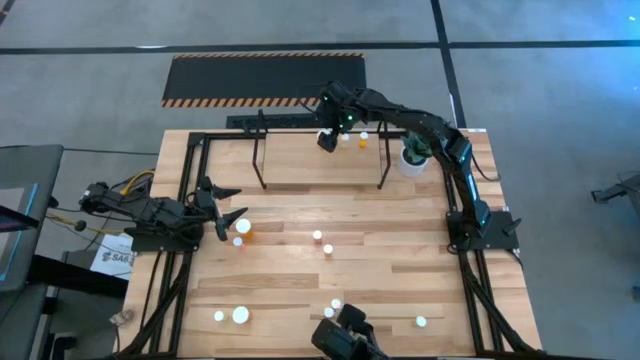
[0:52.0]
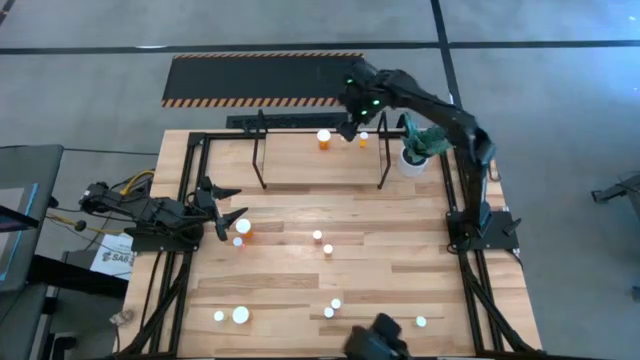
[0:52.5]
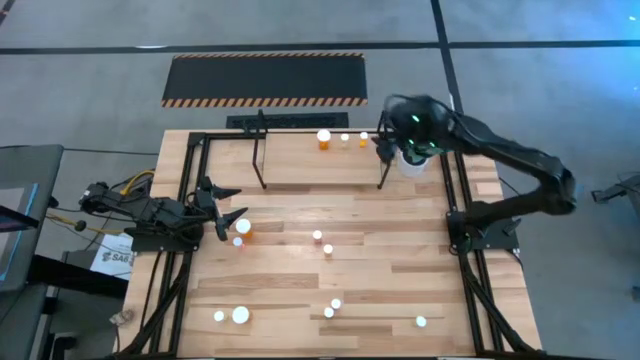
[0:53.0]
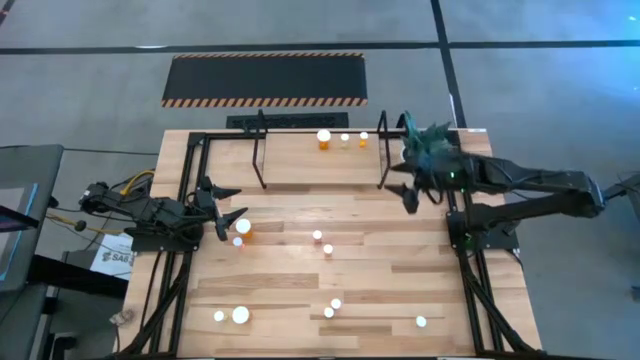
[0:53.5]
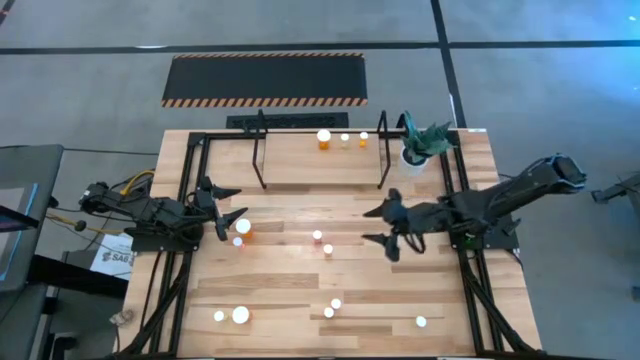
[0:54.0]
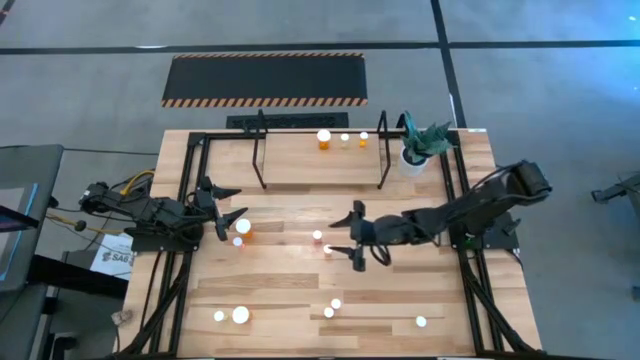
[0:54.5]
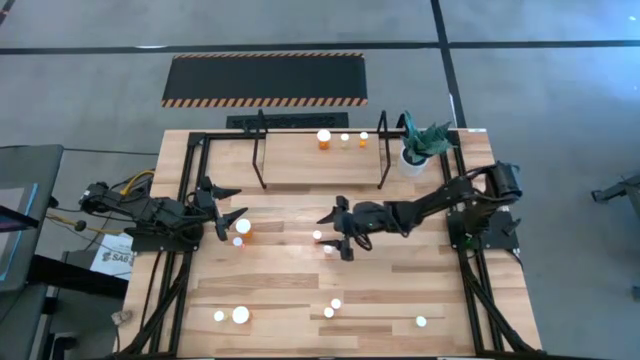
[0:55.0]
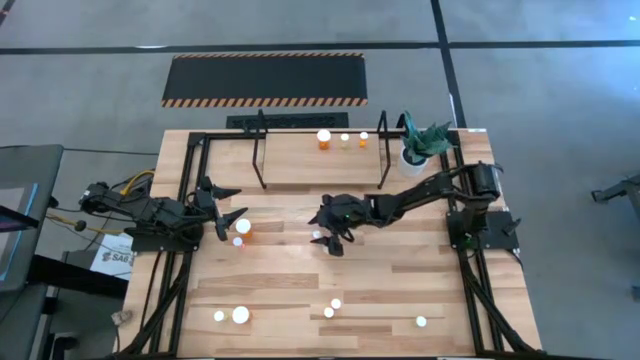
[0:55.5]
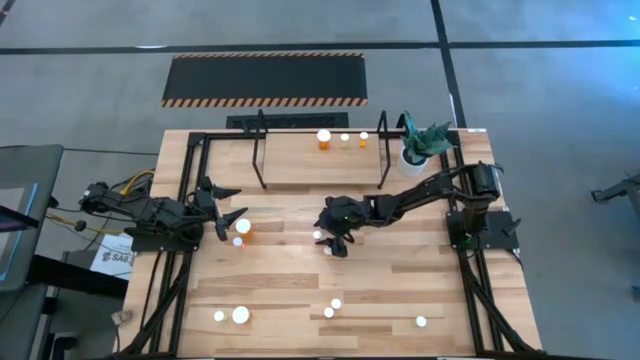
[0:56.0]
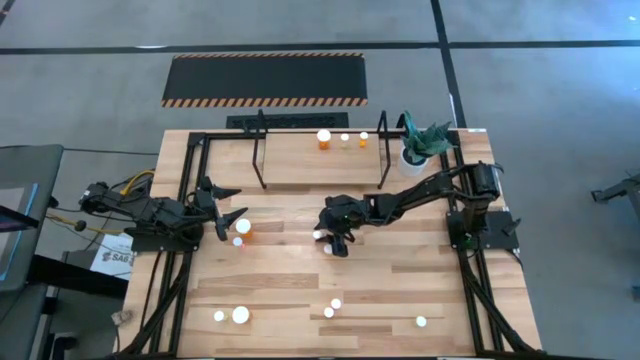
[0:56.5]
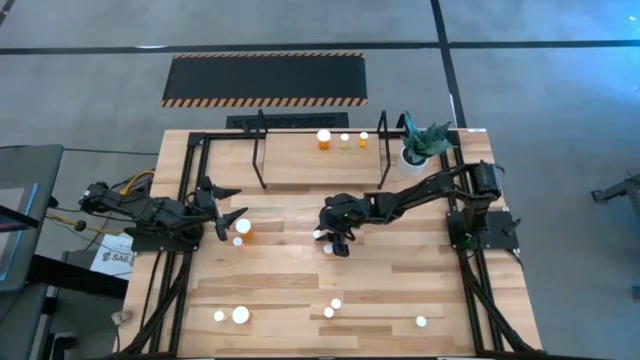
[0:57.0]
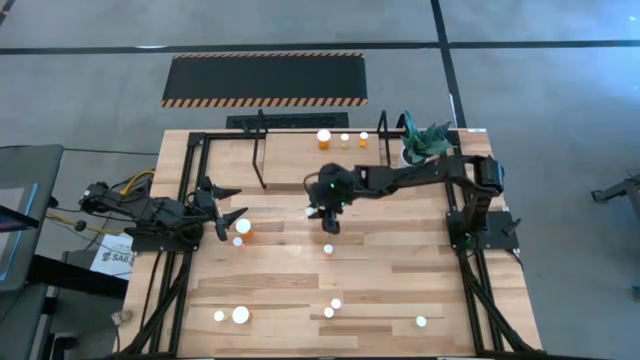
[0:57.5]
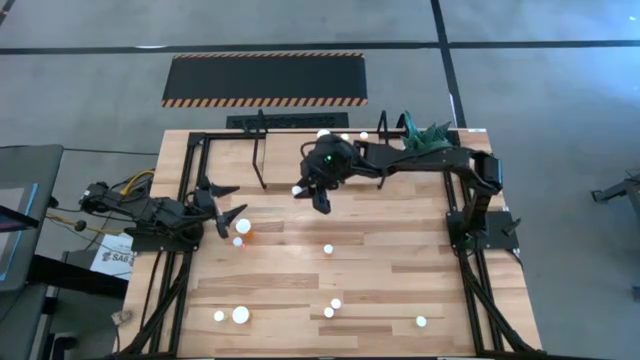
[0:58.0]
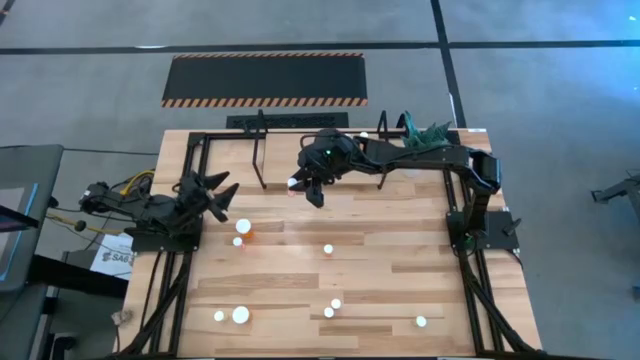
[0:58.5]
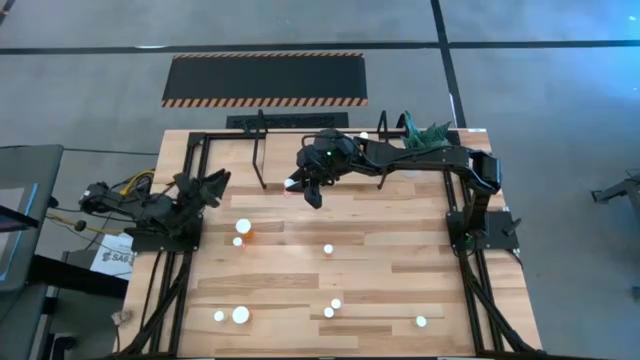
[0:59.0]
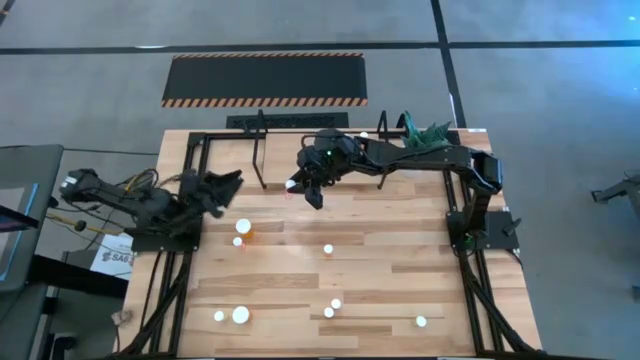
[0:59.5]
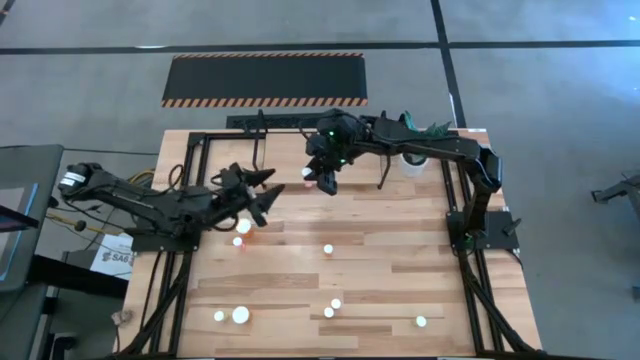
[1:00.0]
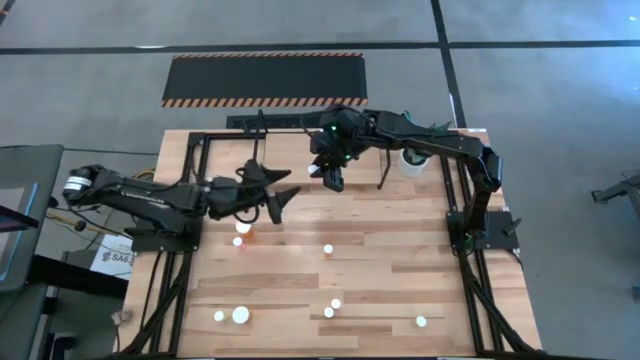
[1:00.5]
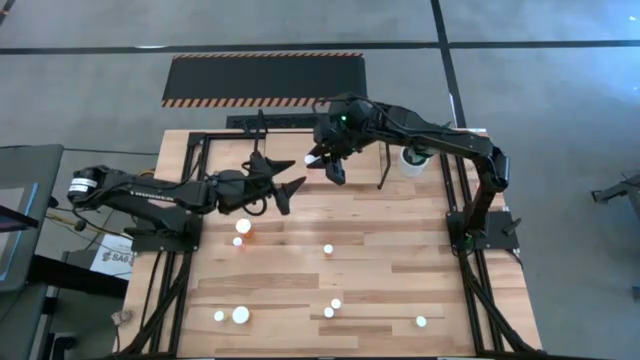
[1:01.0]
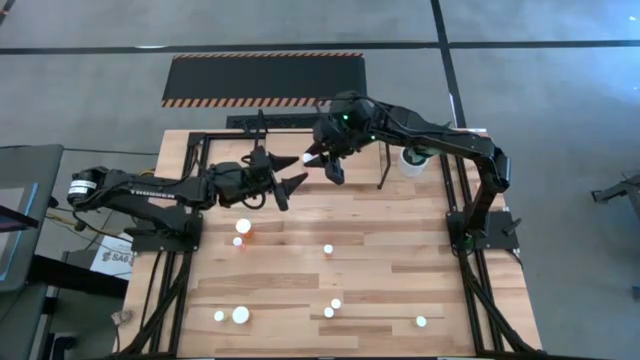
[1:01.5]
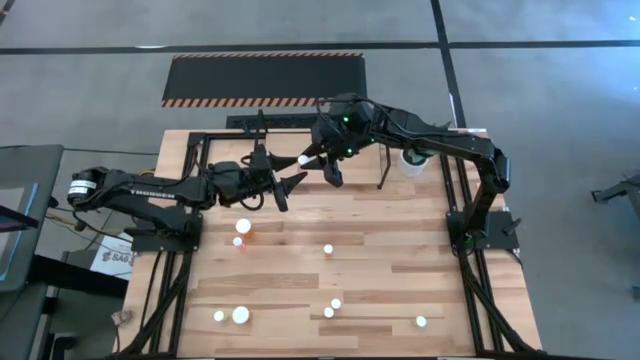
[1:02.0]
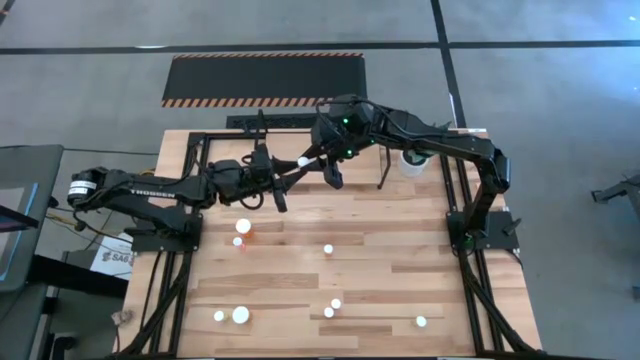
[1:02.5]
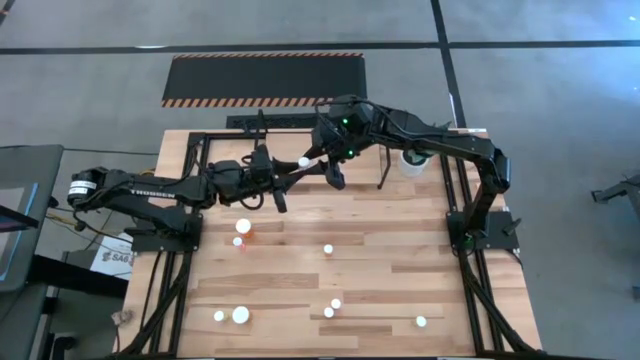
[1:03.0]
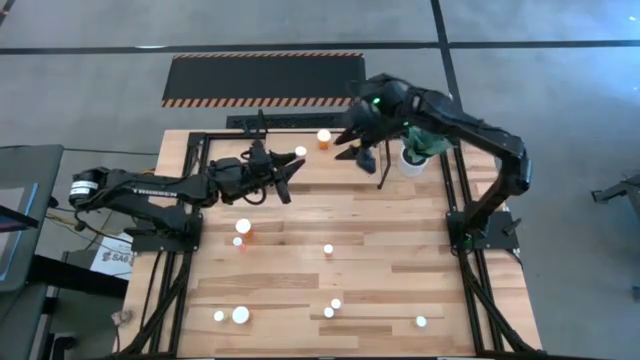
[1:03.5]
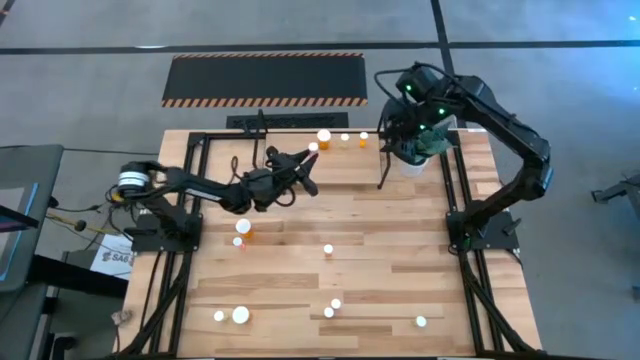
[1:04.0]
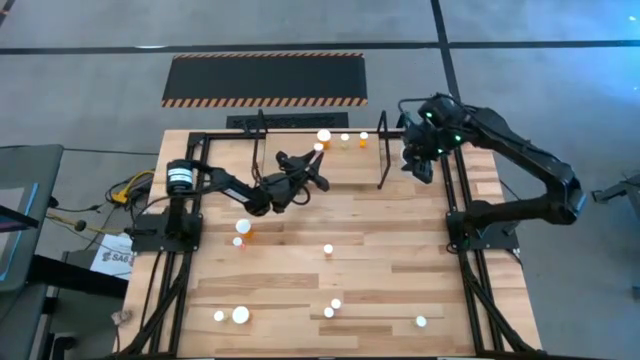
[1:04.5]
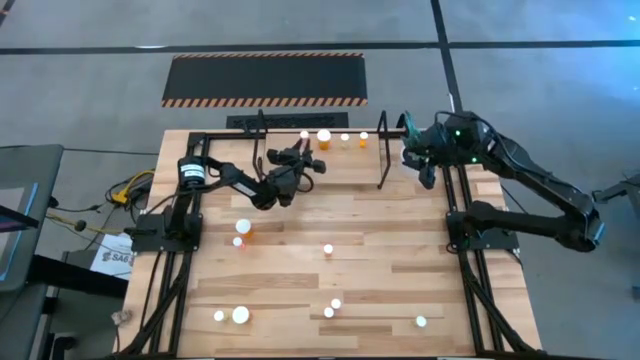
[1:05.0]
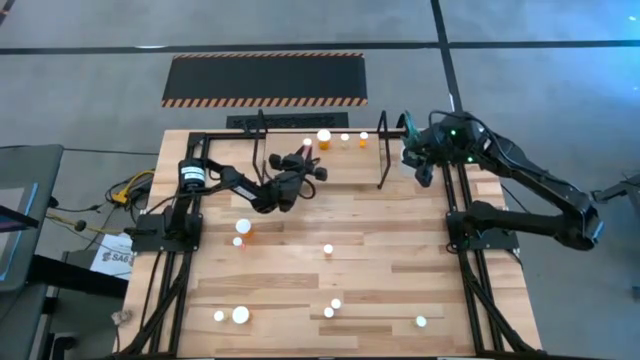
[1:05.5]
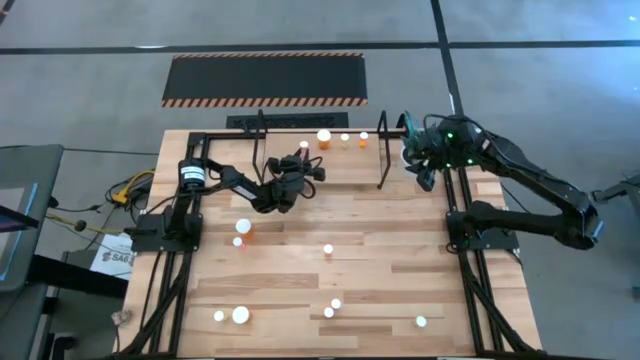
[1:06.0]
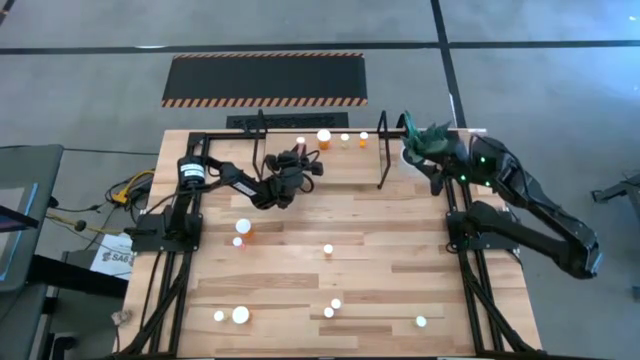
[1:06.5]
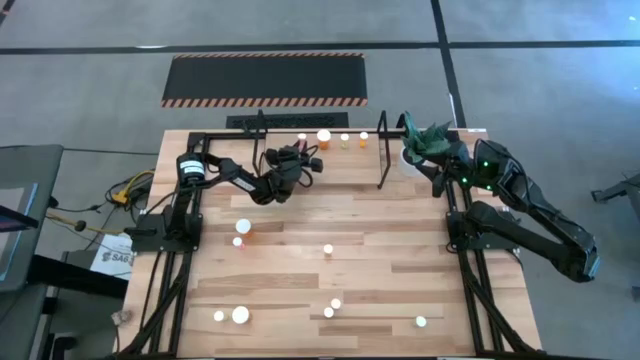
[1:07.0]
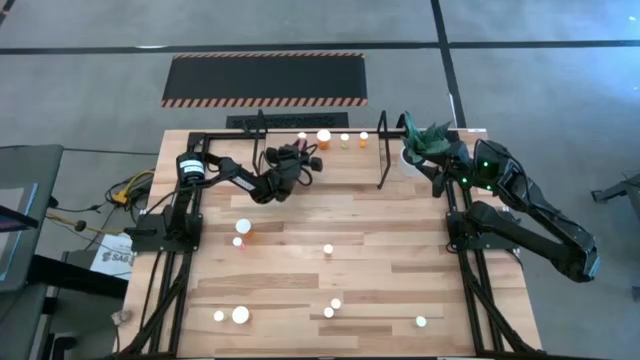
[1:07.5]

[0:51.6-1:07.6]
Task: Pick and place medicine bottles onto shelf by color
Put the top right small pink pill bottle on the shelf

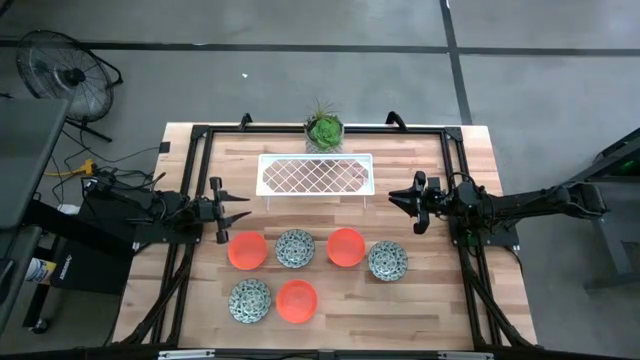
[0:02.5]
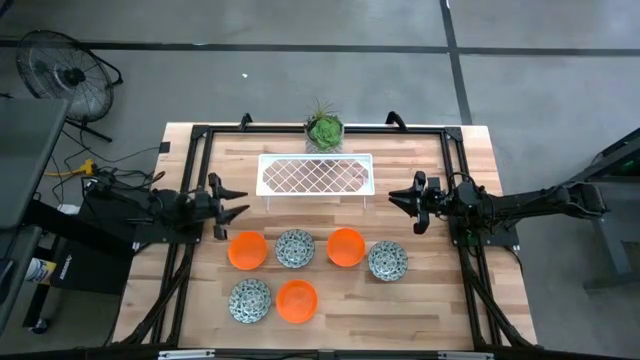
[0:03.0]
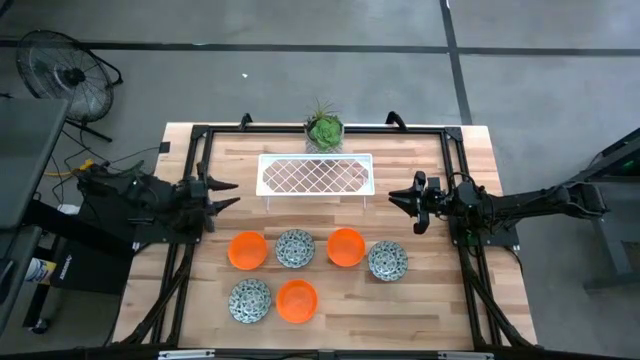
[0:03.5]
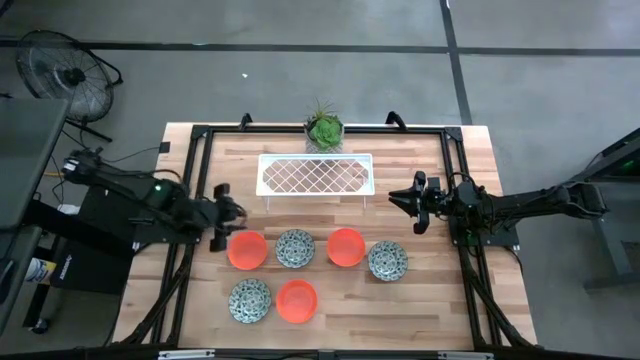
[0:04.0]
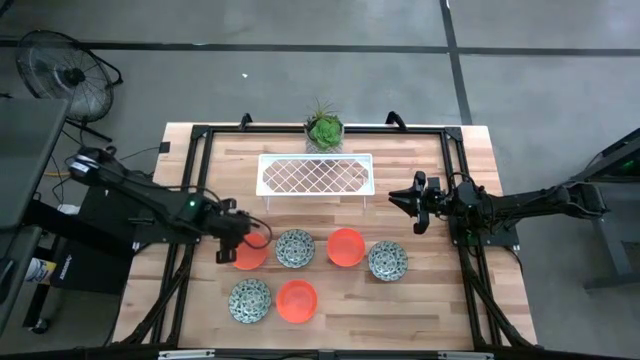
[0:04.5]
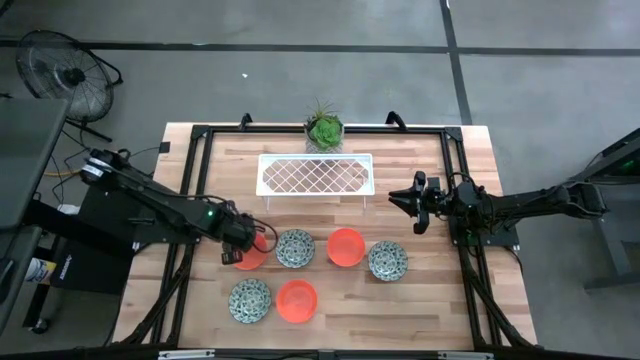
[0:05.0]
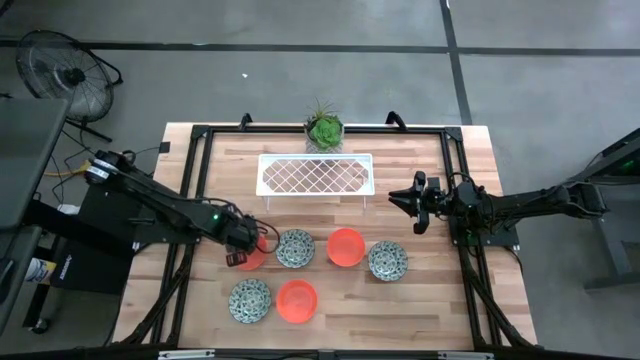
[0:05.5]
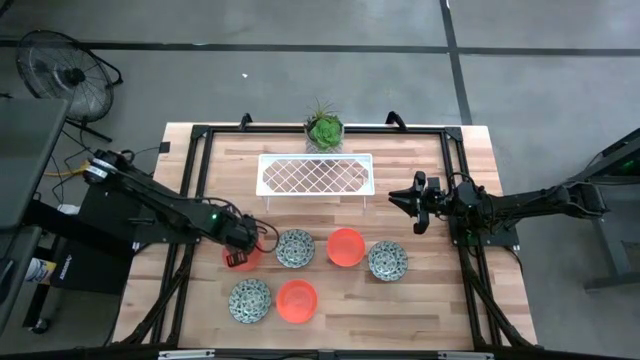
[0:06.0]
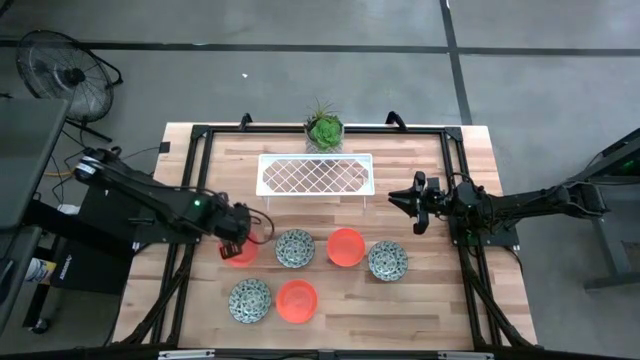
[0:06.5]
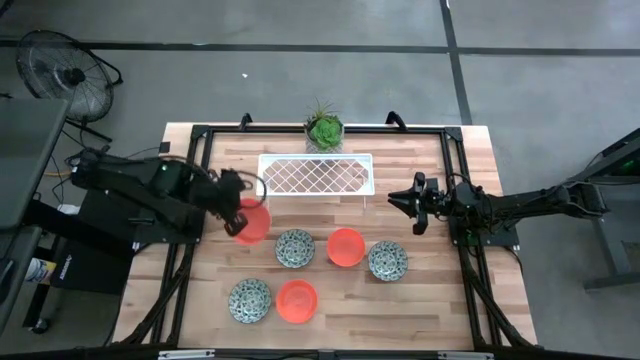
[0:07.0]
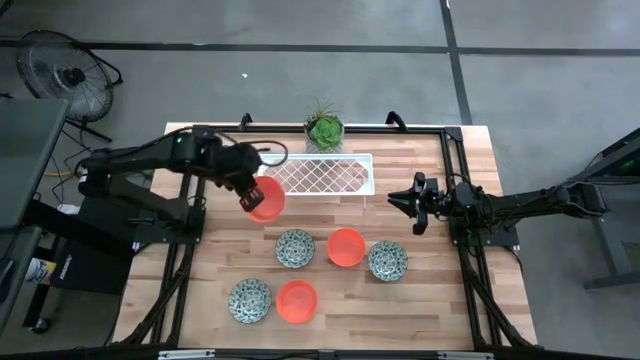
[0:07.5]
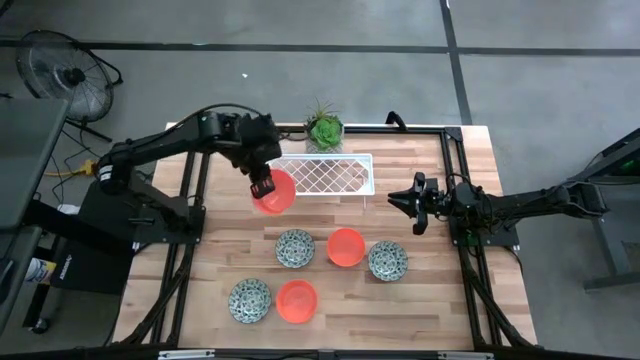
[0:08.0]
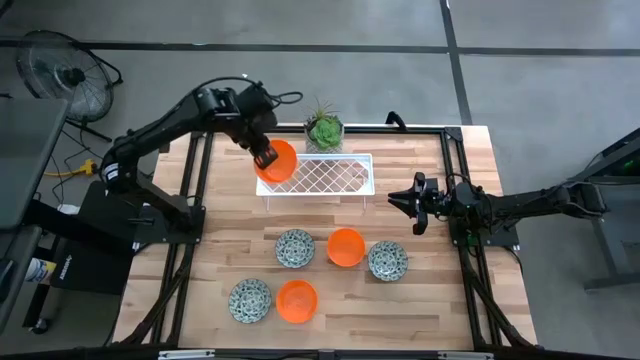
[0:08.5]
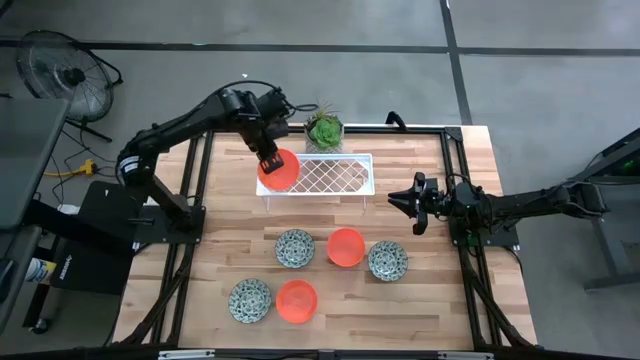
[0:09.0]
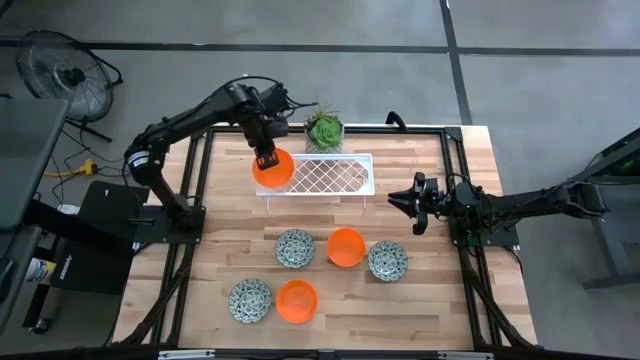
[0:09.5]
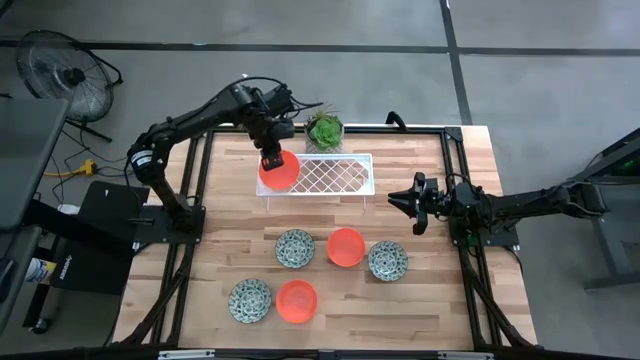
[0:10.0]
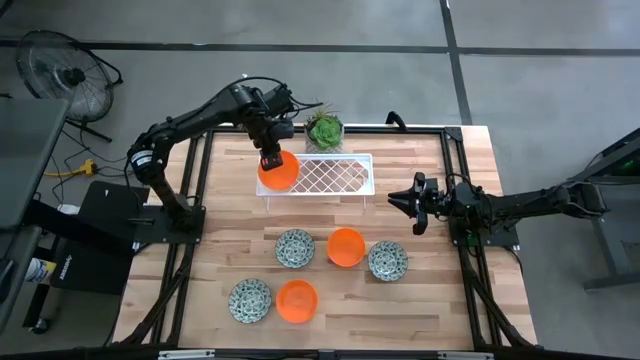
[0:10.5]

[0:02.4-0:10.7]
Task: Pick & Place Mini bowls
Put the top left orange bowl on the shelf
